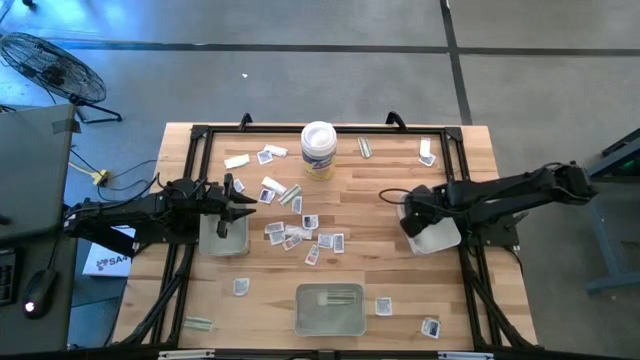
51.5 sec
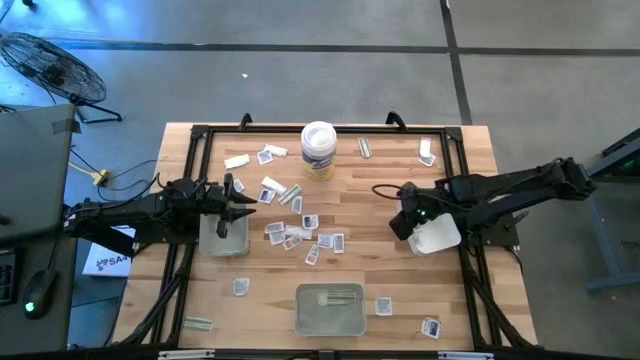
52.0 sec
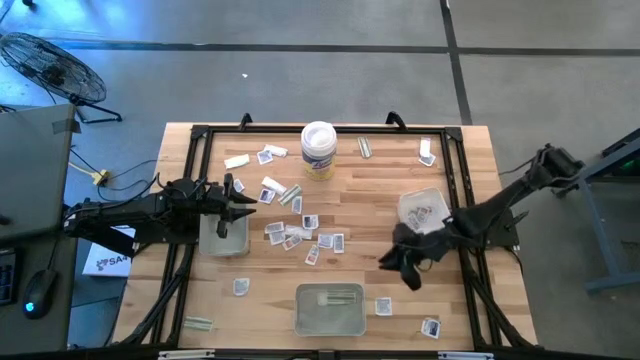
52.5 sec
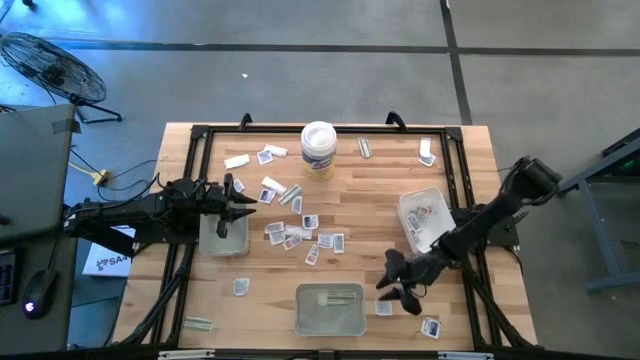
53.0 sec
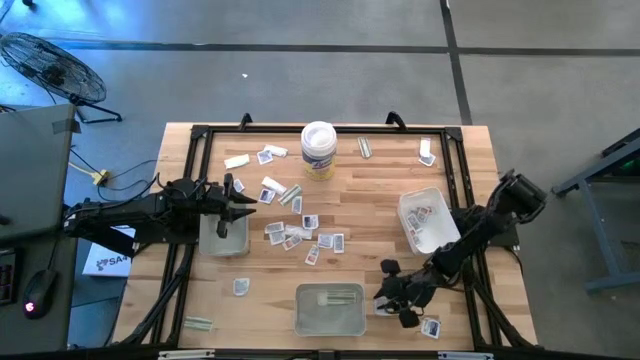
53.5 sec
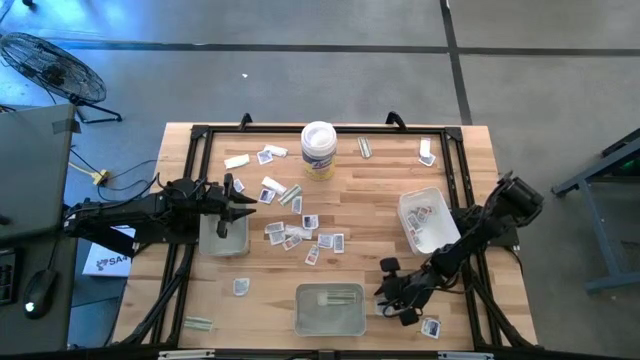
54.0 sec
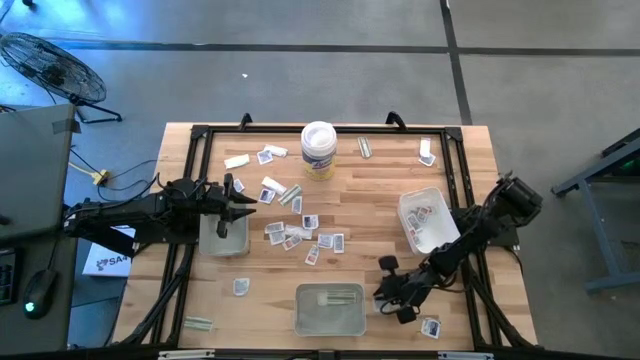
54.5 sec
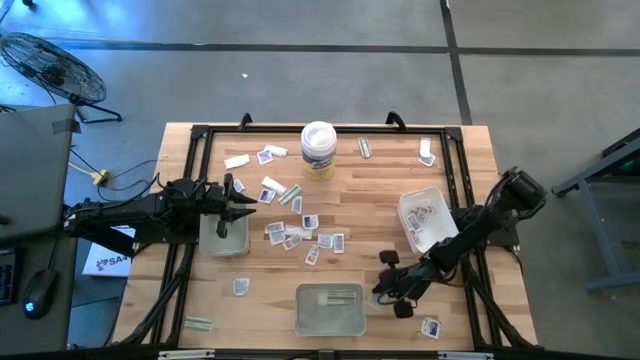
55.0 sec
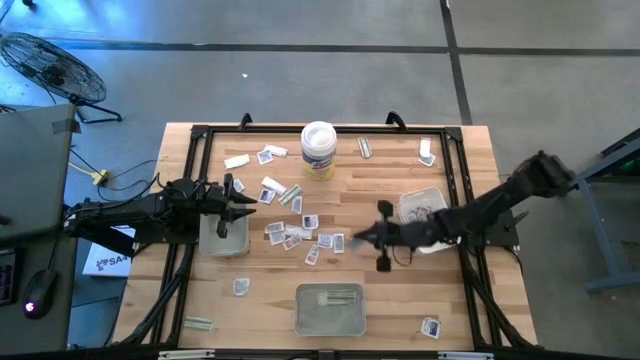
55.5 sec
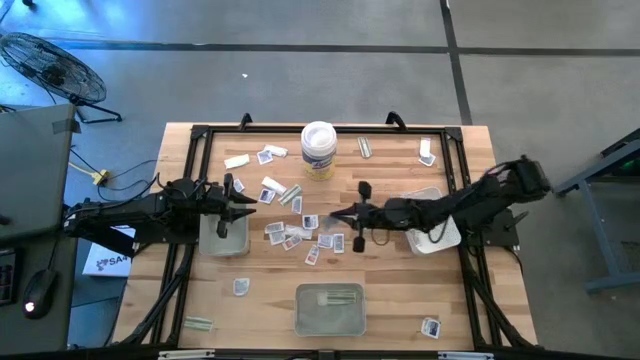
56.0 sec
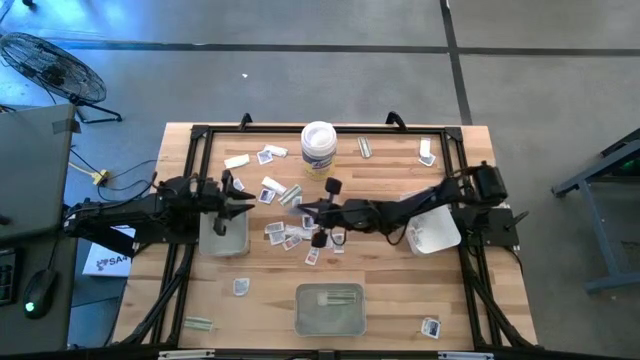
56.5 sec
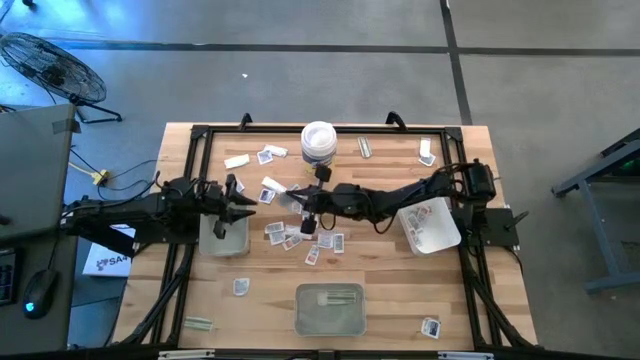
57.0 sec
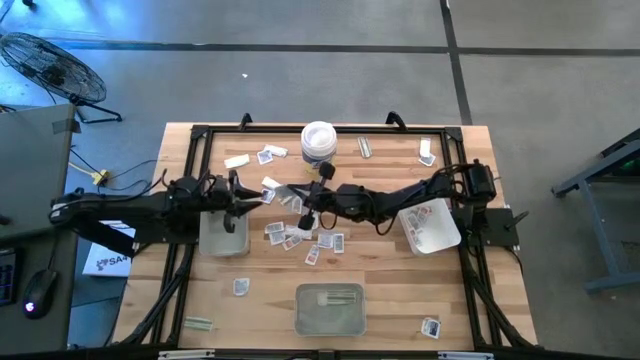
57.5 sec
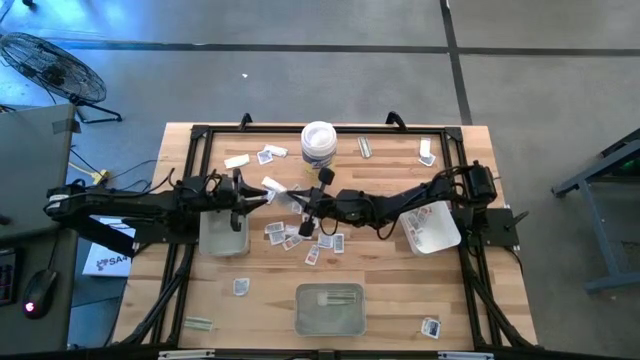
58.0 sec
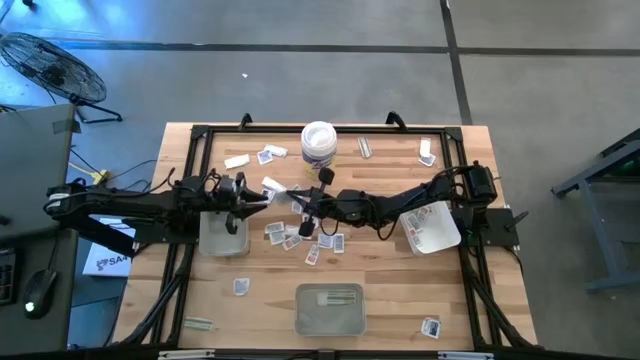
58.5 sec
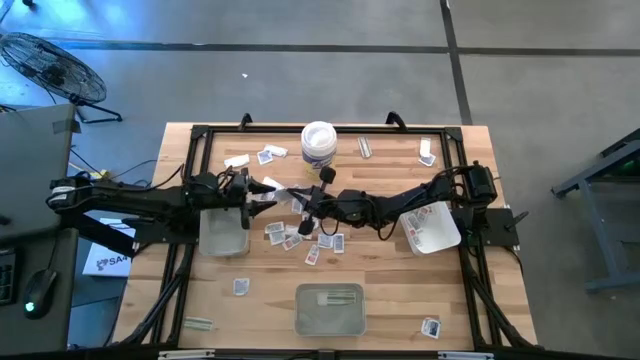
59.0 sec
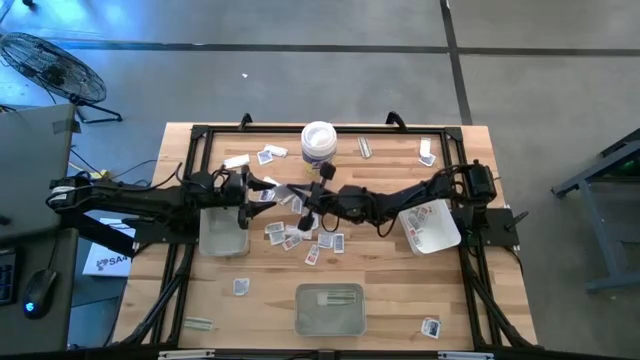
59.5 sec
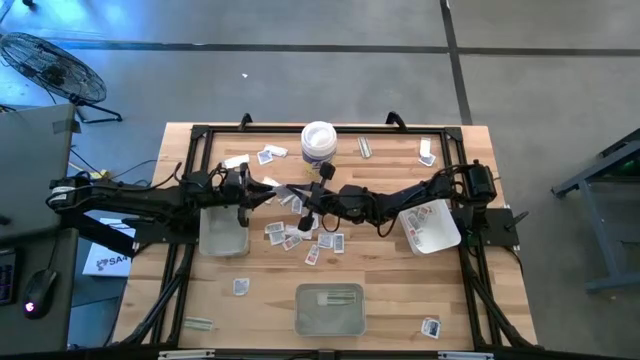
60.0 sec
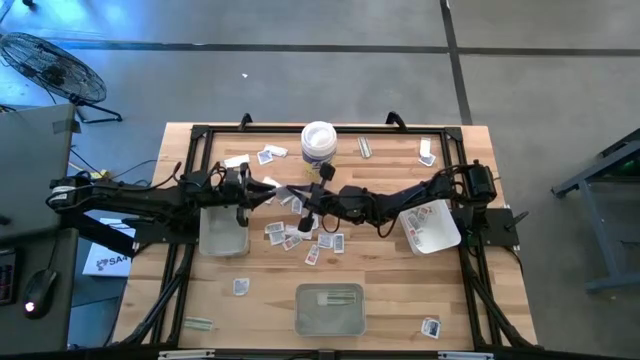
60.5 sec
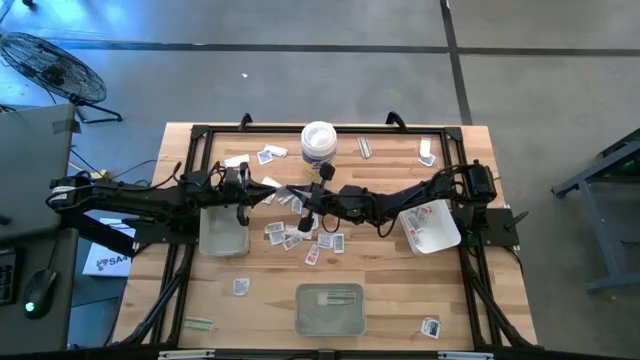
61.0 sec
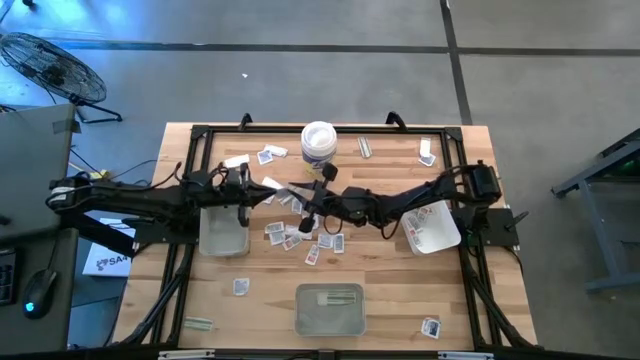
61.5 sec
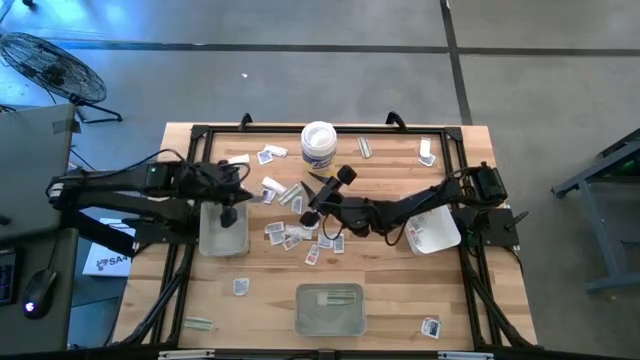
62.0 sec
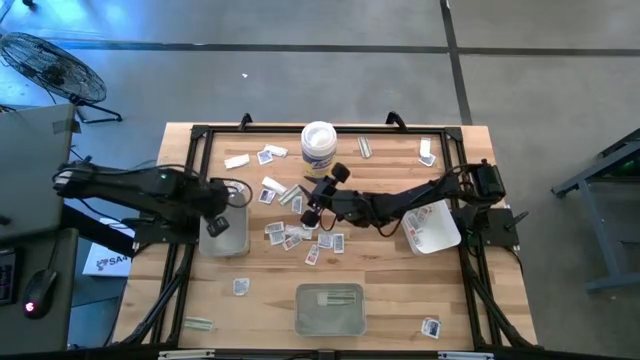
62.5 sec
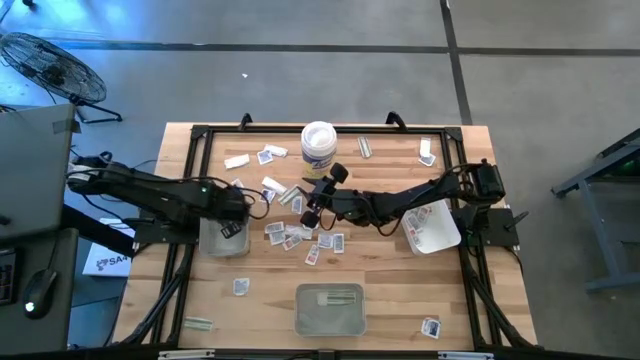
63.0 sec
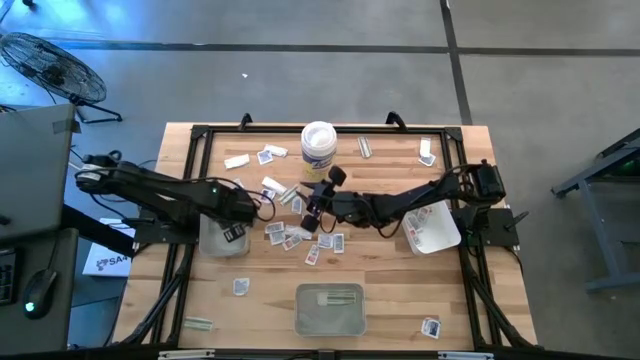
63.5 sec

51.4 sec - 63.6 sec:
Task: Pick & Place First Aid Supplies
Put the blue alcohol pad into the top gray bin

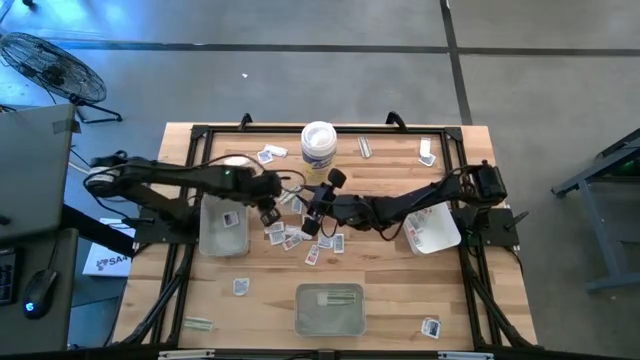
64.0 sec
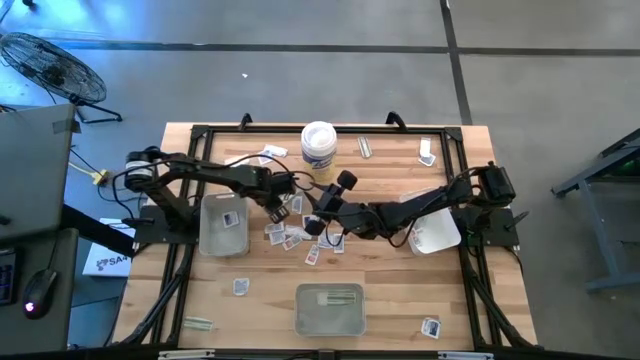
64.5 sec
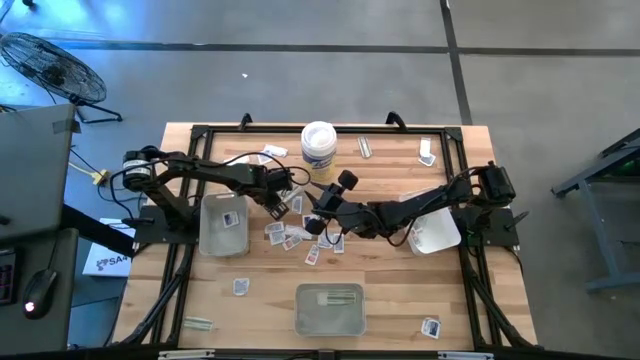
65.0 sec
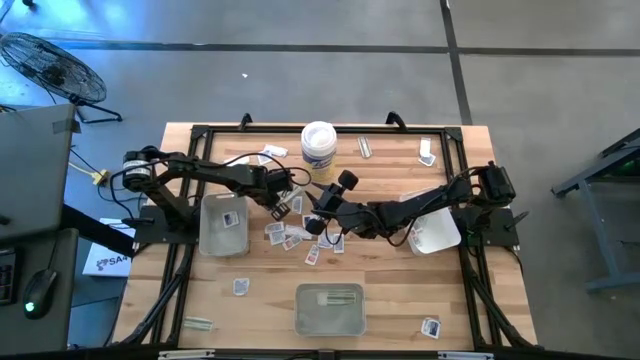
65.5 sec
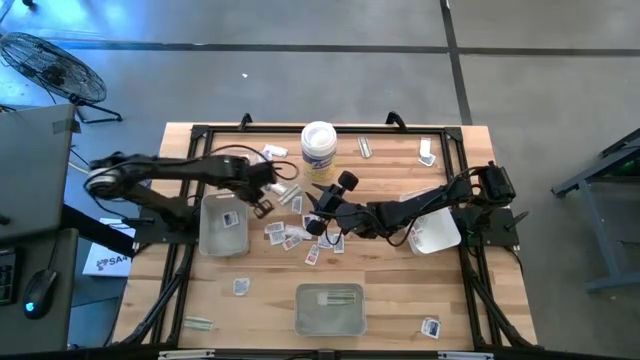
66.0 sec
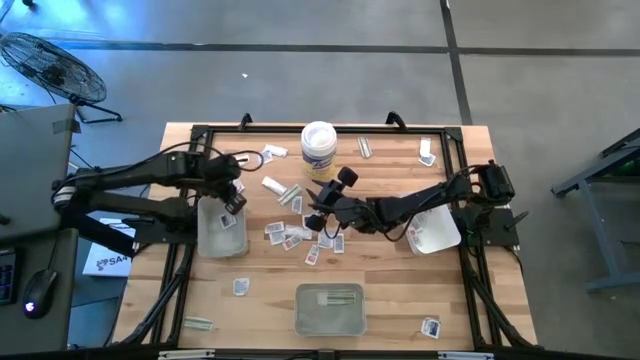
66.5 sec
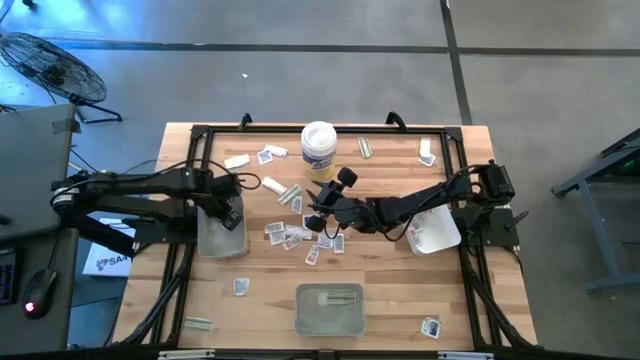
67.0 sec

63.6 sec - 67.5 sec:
Put the blue alcohol pad into the top gray bin

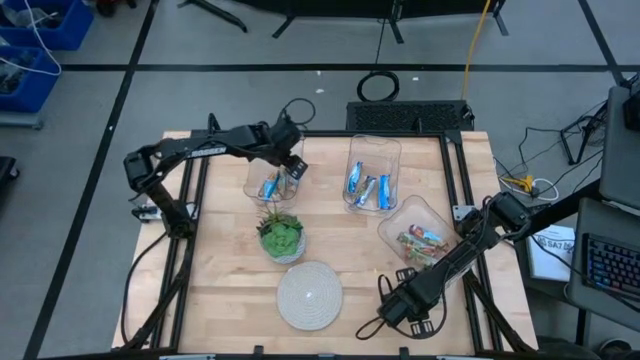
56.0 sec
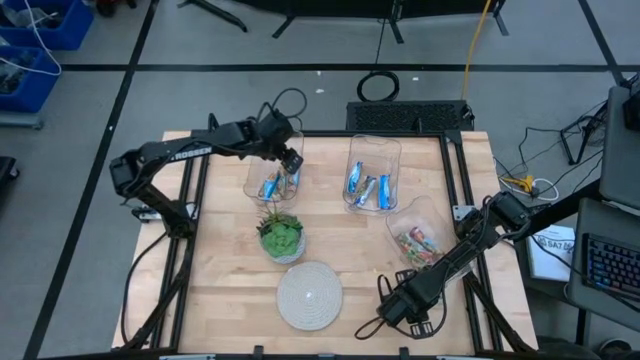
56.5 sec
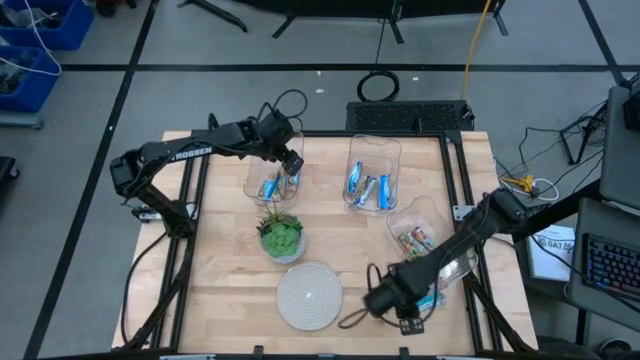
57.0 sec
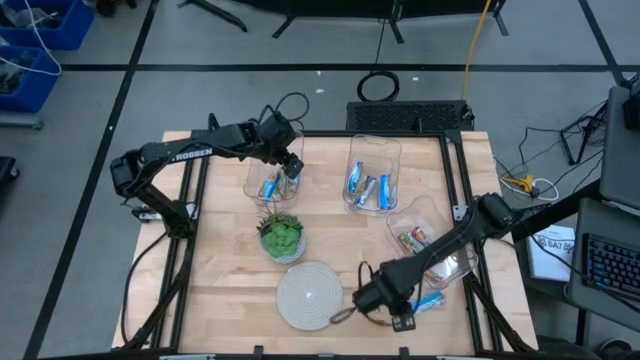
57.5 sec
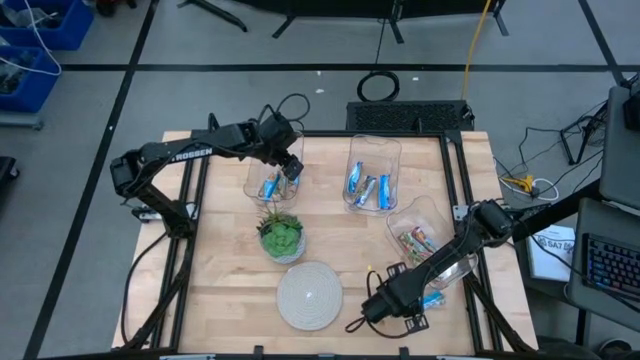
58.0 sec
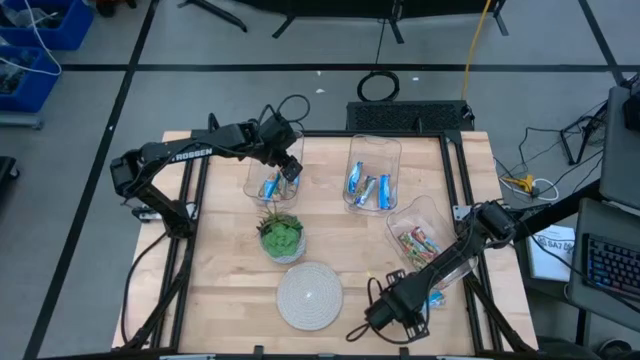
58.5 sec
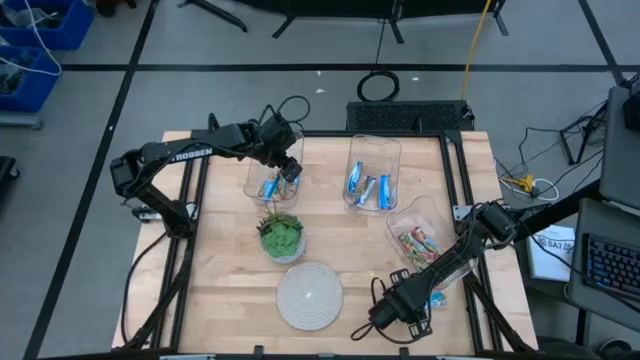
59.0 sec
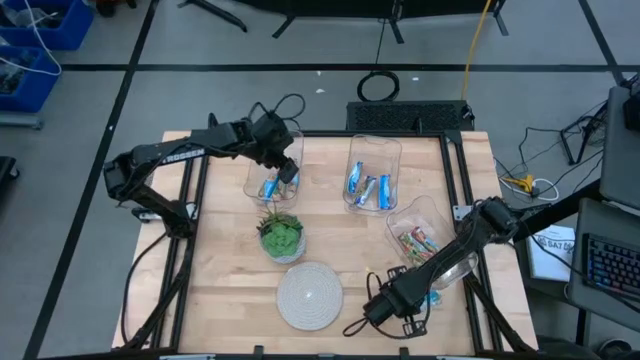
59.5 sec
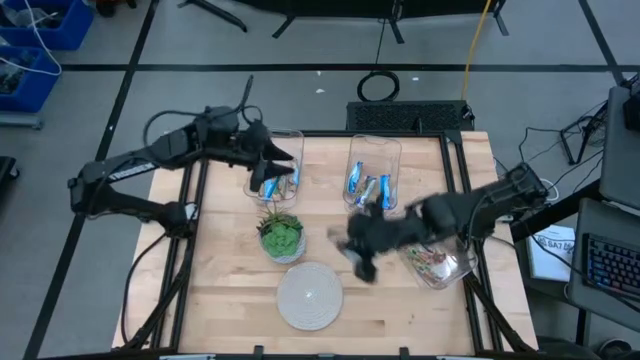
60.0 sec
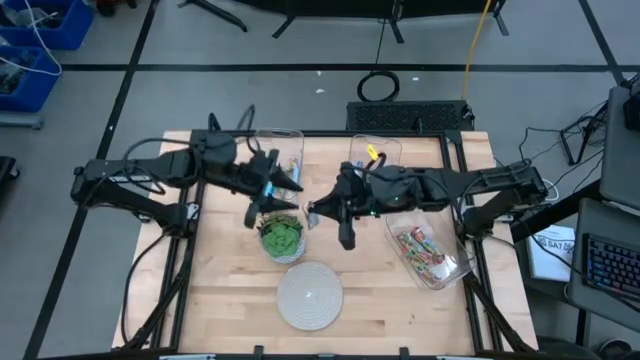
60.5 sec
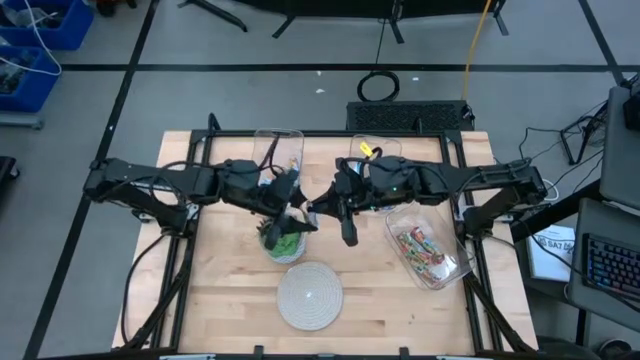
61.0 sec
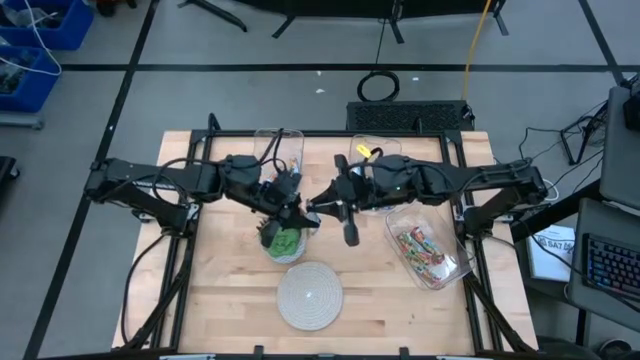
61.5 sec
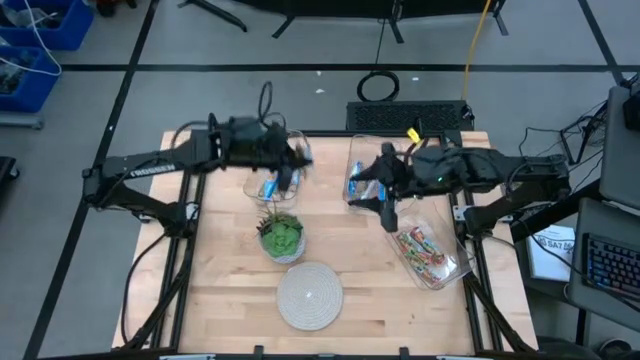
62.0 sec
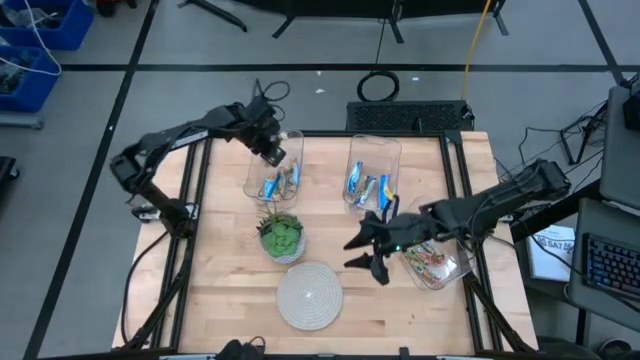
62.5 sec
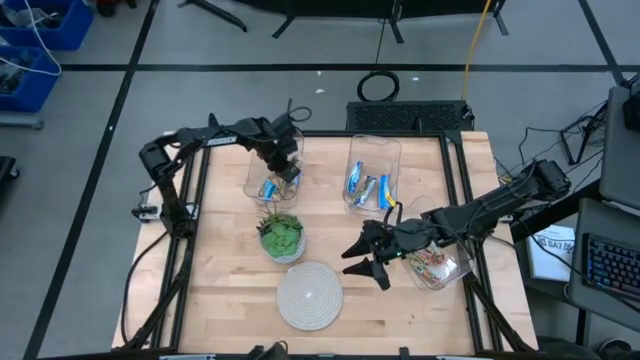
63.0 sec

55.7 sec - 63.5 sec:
Task: Pick and place Granola Bars by type
Put the yellow granola bar into the top left transparent bin
